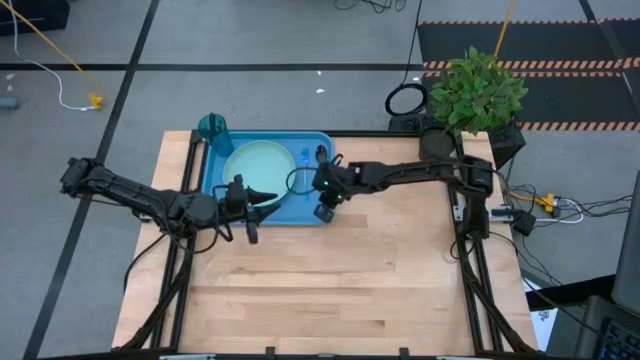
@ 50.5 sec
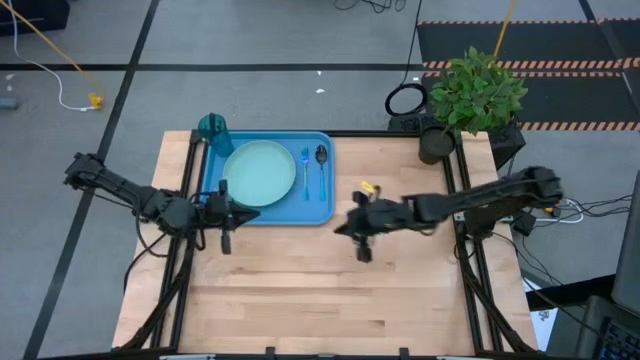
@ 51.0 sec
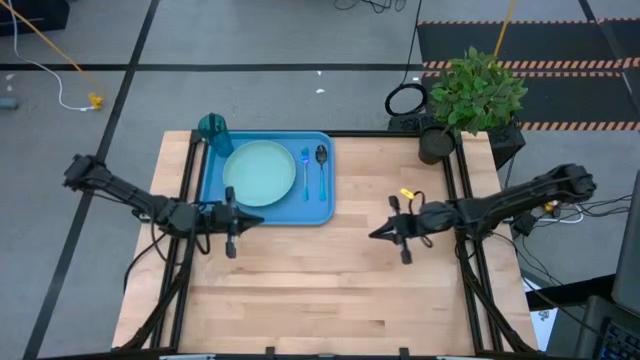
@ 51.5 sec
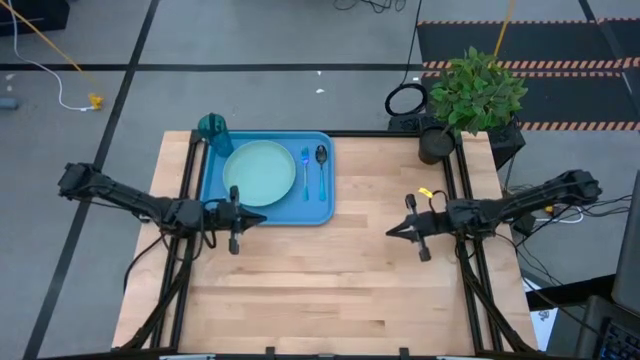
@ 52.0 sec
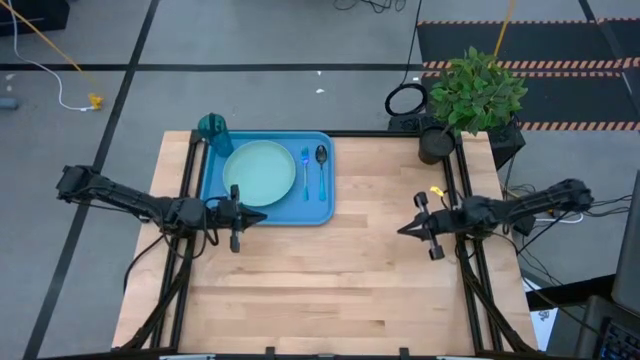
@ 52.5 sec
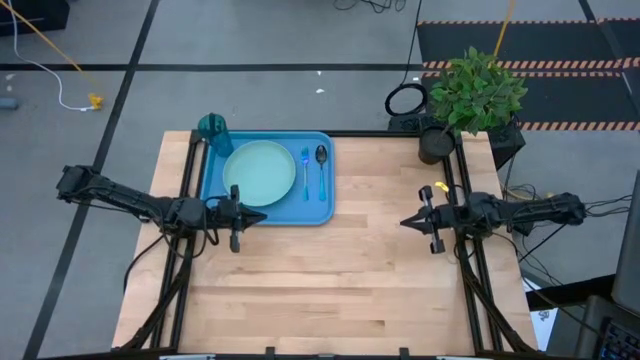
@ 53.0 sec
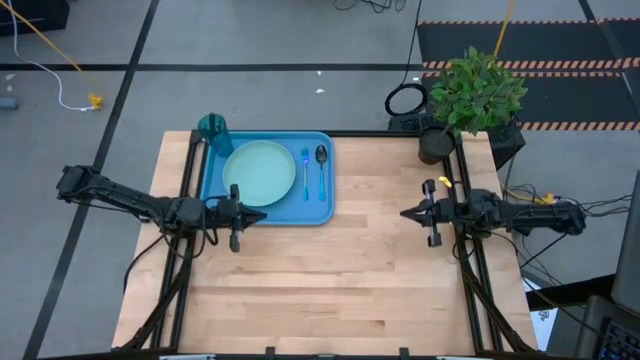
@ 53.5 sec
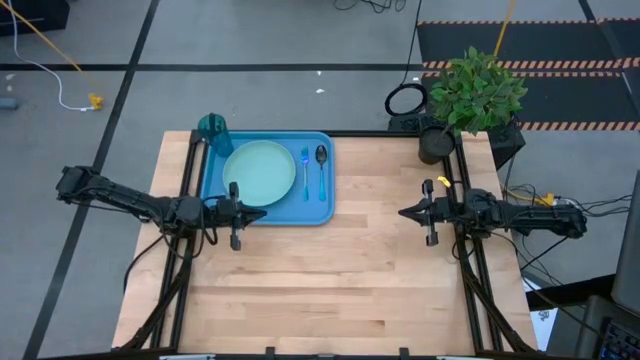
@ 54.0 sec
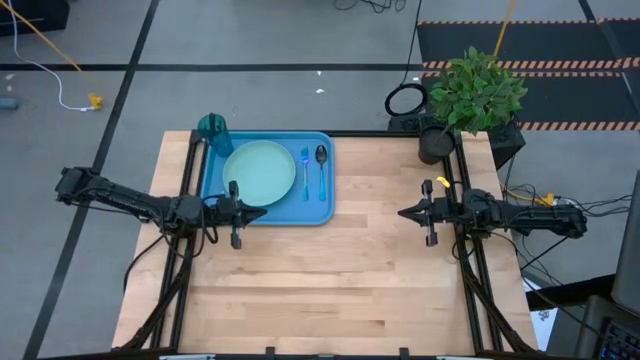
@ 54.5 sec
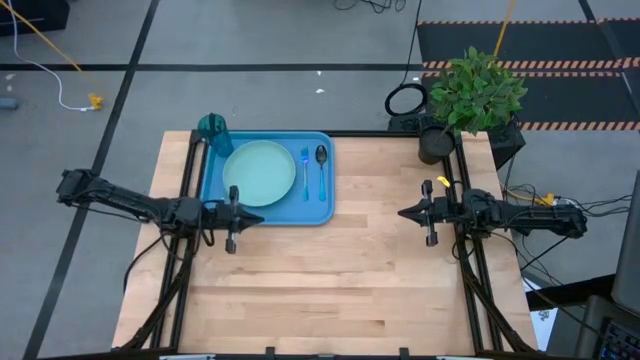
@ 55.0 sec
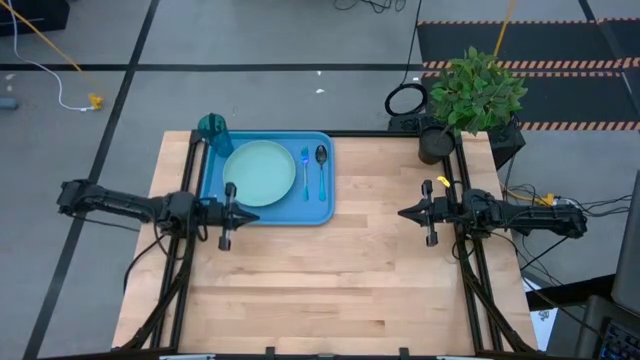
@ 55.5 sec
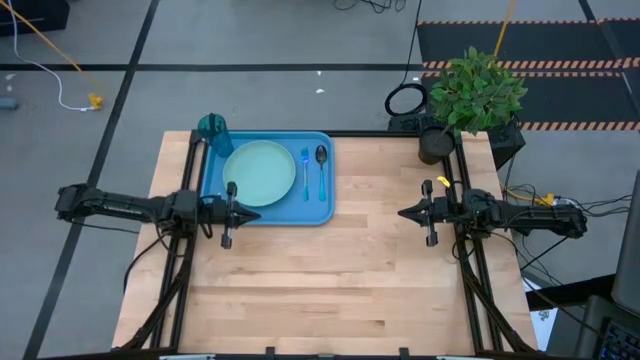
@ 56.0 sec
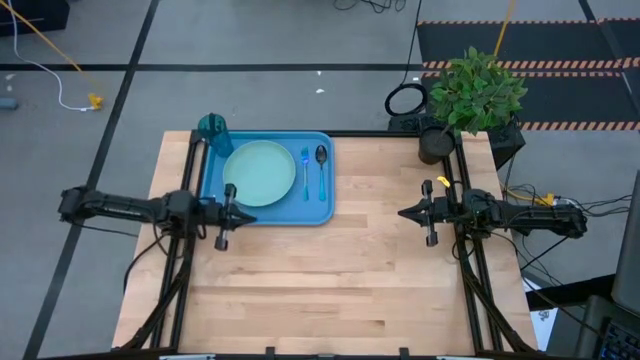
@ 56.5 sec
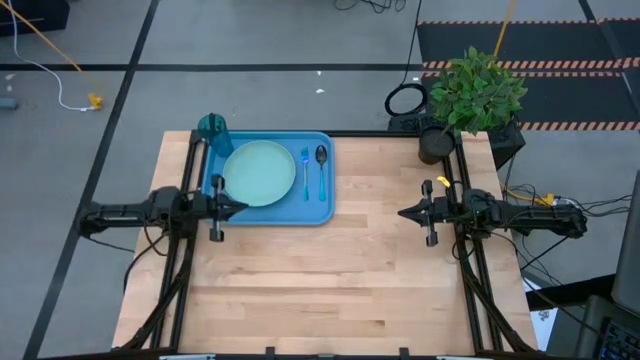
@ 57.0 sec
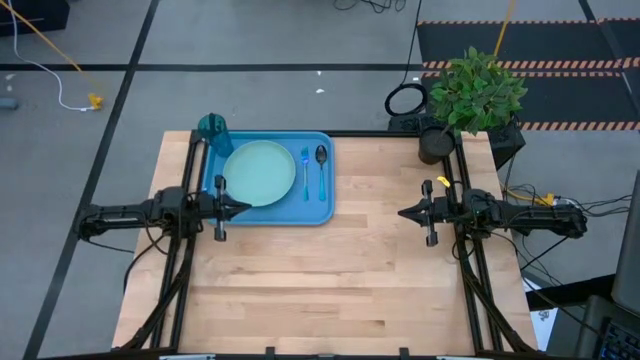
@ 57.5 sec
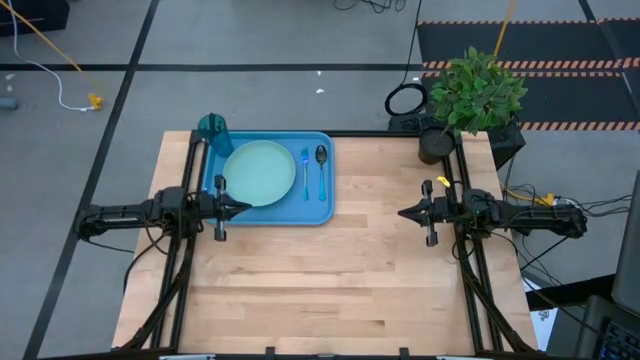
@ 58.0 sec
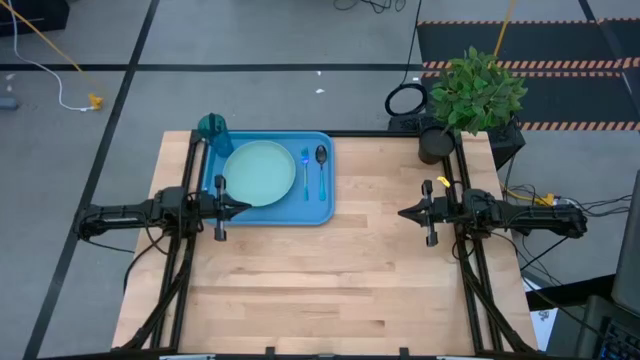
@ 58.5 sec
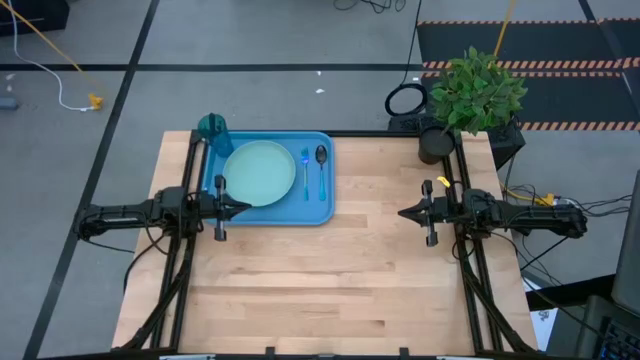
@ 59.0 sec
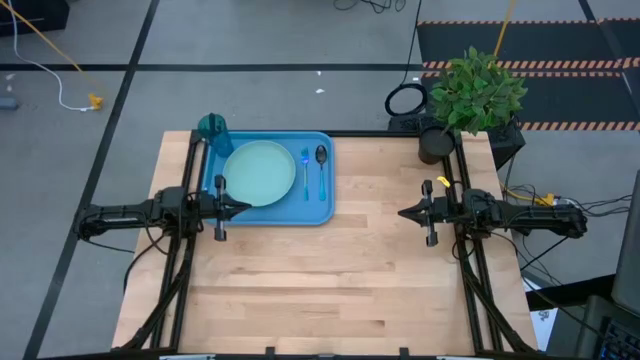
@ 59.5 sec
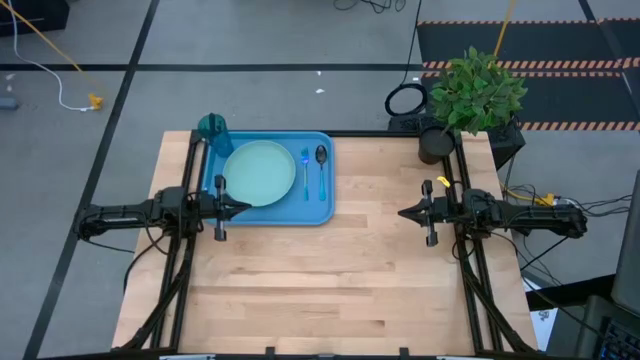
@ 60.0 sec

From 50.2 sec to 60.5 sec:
Task: Pick and place plate/cup/fork/spoon on tray
Return to Home Position

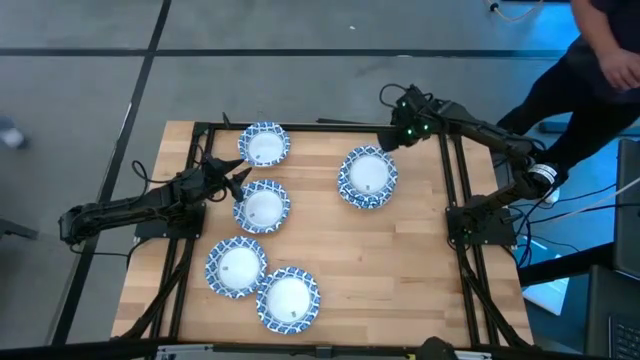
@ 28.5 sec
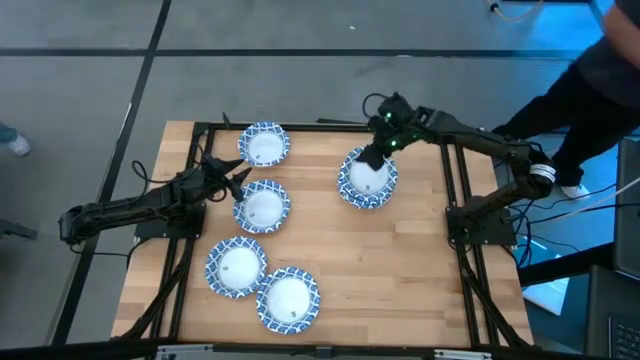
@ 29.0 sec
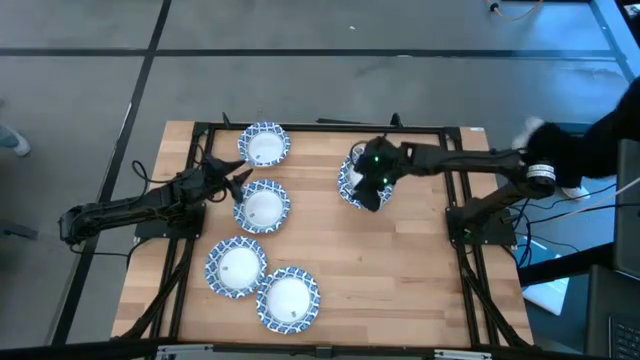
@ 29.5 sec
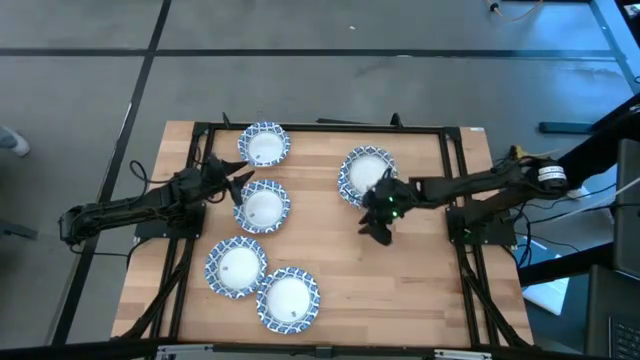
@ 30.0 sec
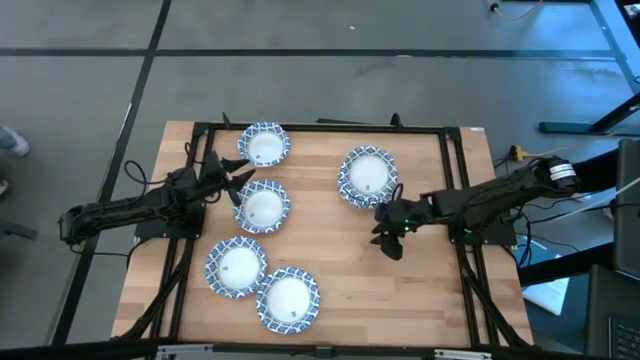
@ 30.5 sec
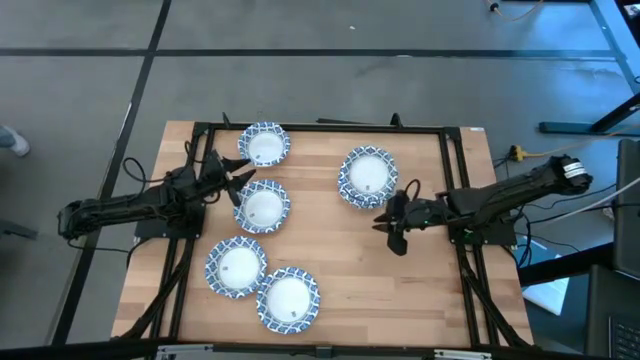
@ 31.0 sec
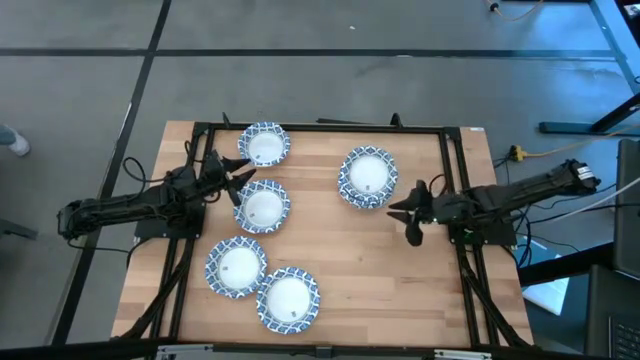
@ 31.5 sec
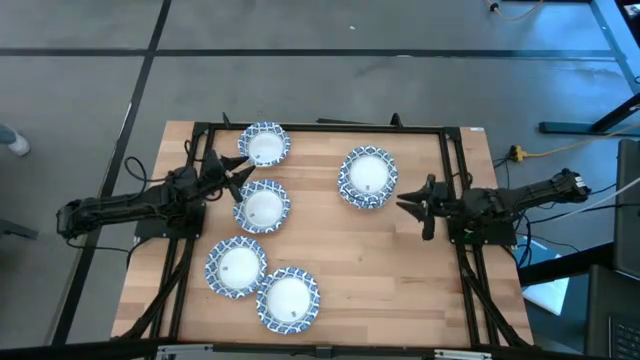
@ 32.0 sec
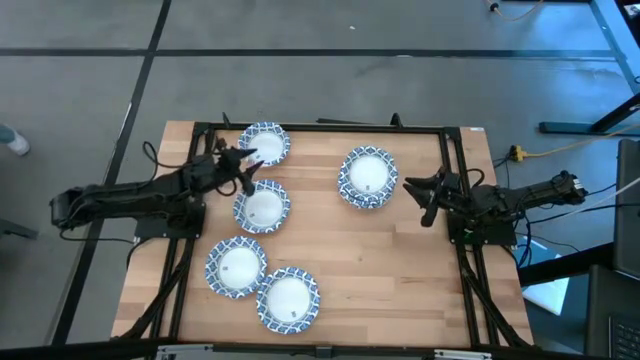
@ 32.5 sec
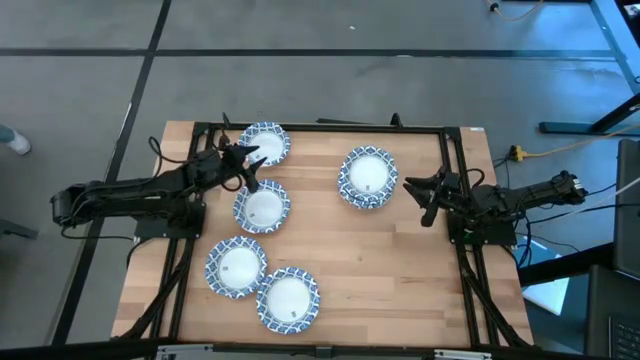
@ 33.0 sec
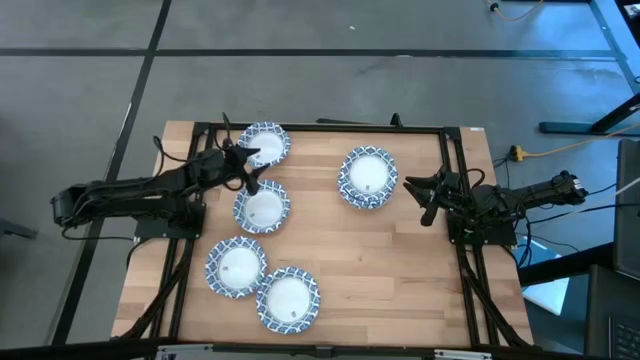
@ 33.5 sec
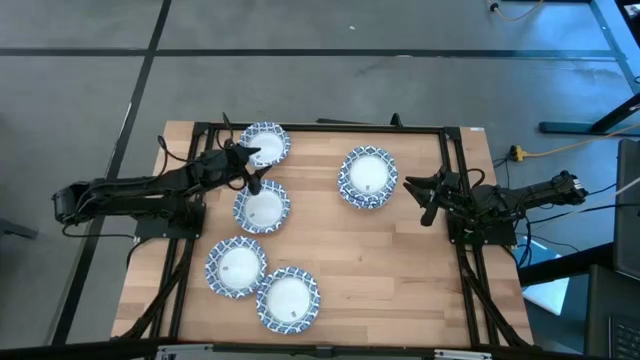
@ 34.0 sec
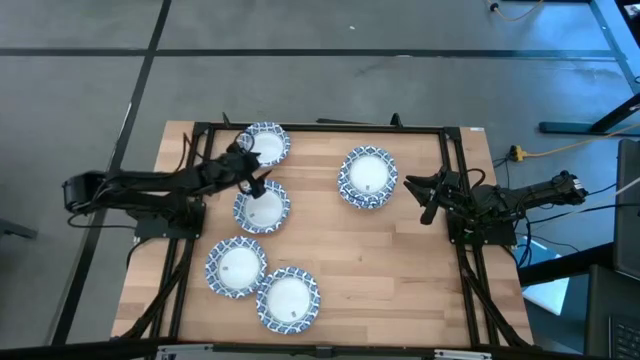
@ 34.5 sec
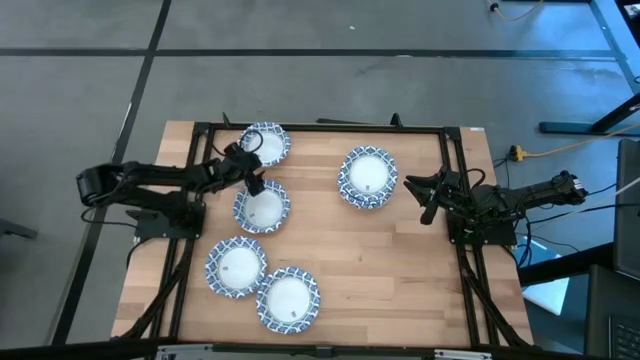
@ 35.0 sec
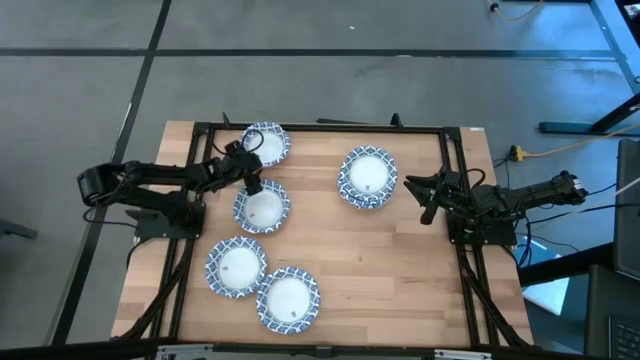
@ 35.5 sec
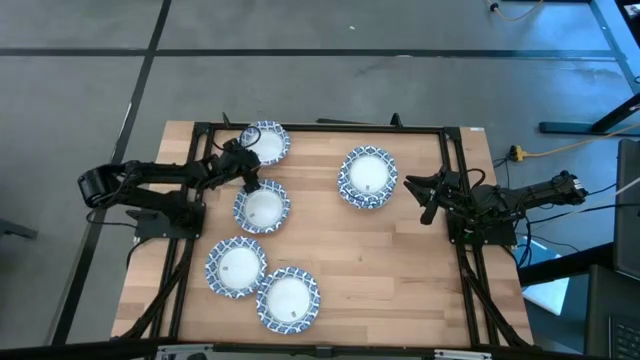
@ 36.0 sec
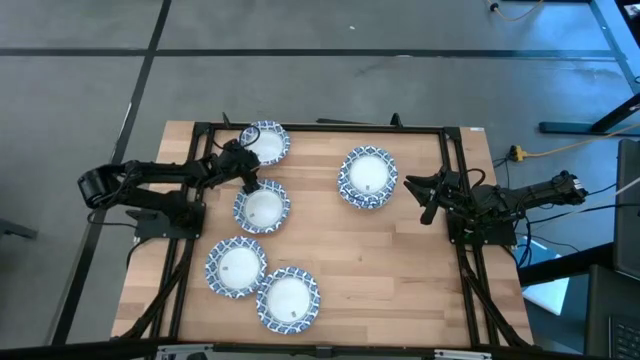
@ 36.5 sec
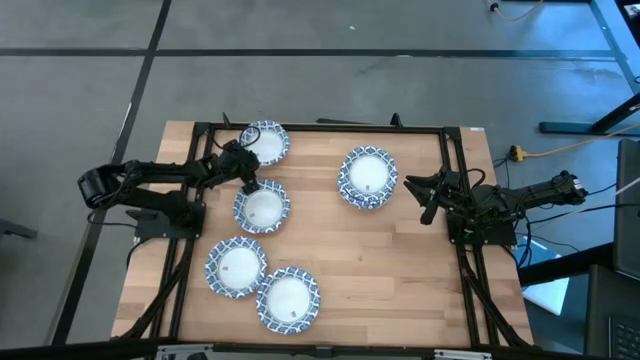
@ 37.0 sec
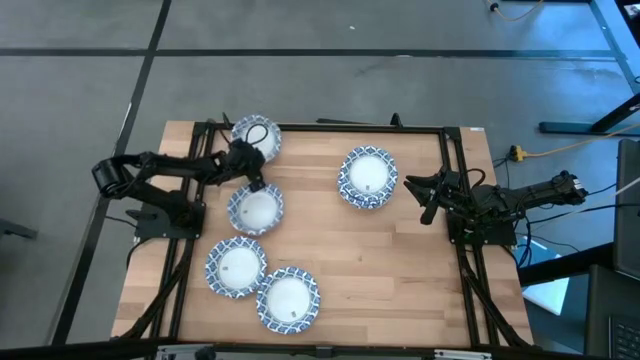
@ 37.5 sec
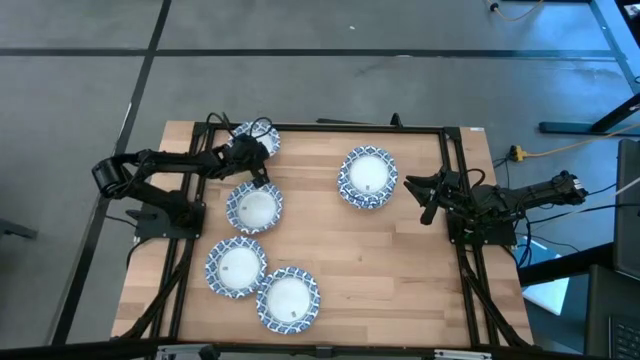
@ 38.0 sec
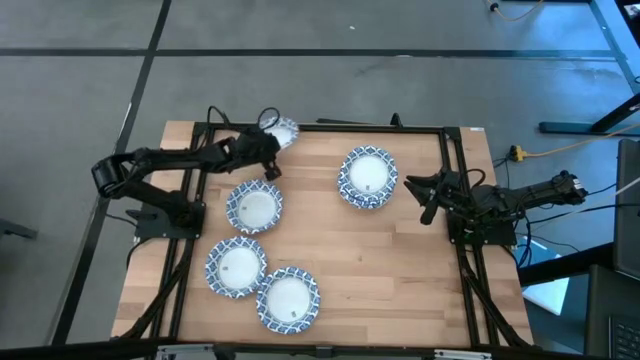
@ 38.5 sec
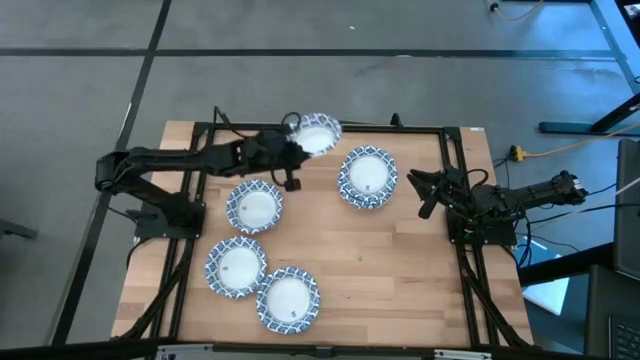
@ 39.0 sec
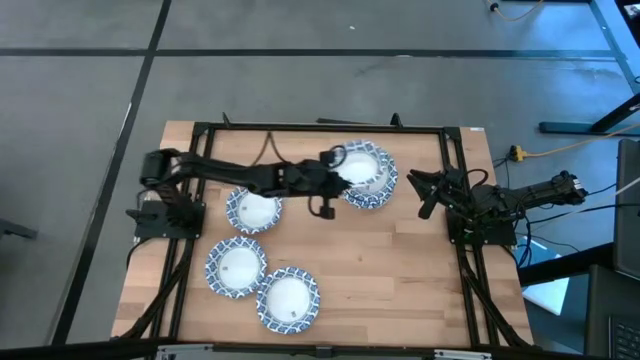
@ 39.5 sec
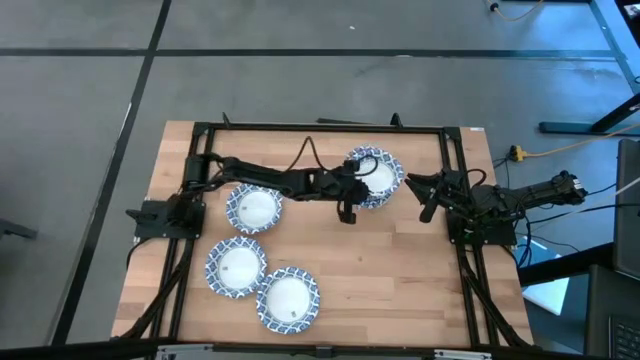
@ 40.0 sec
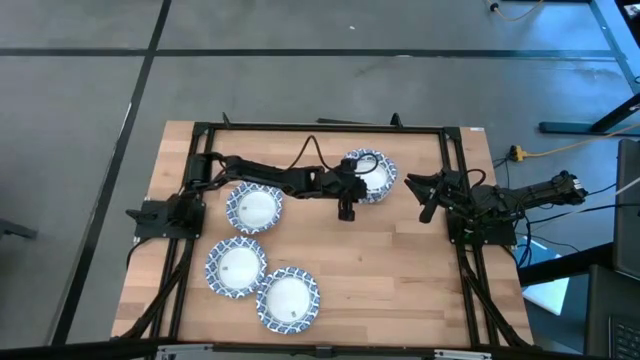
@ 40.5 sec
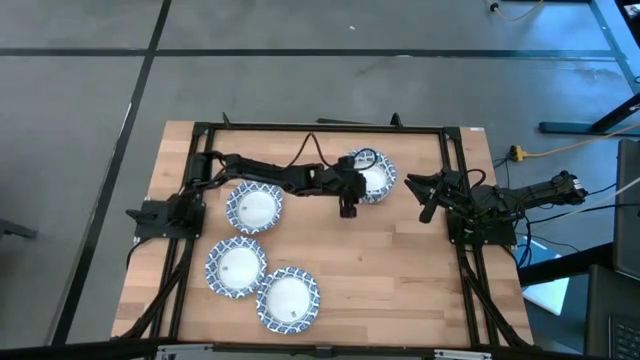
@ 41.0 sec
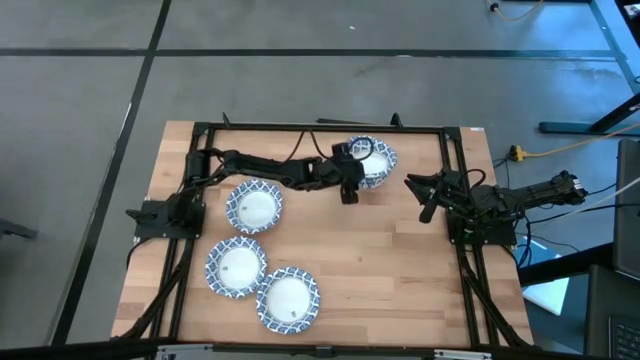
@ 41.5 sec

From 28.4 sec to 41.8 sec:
Task: Nest bowls inside each other
Stack the white bowl on the white bowl
